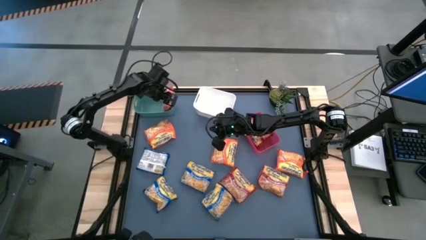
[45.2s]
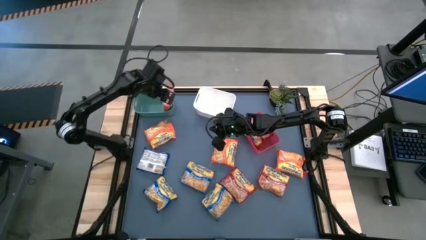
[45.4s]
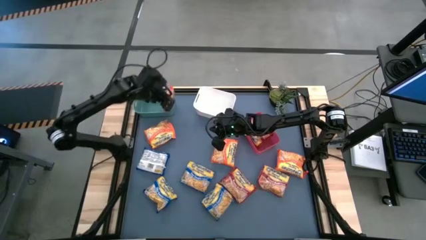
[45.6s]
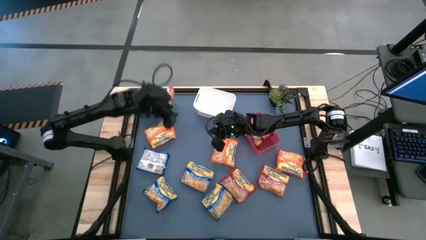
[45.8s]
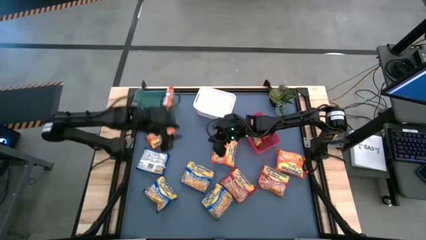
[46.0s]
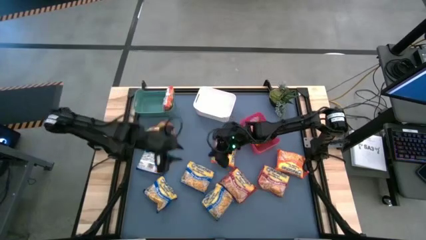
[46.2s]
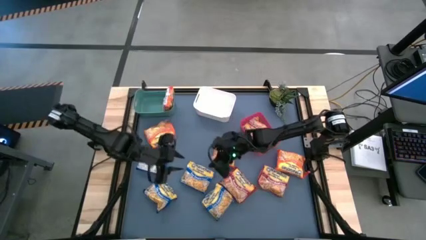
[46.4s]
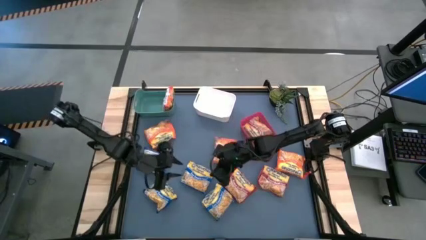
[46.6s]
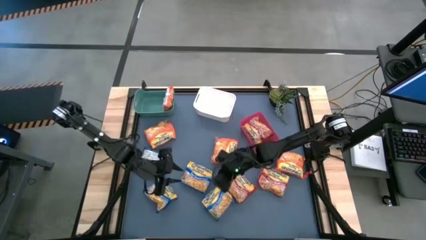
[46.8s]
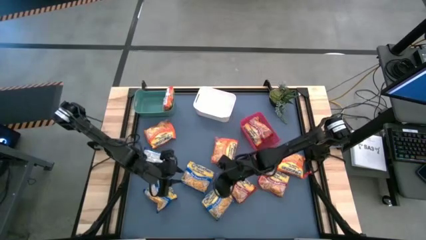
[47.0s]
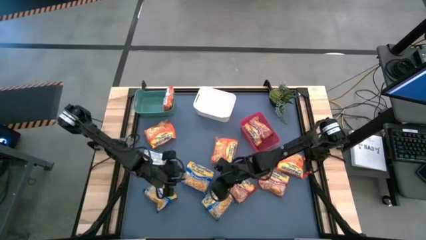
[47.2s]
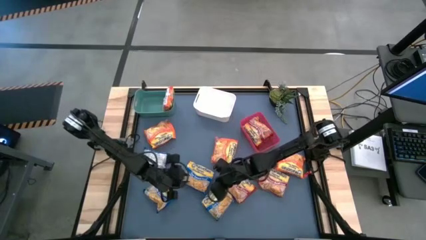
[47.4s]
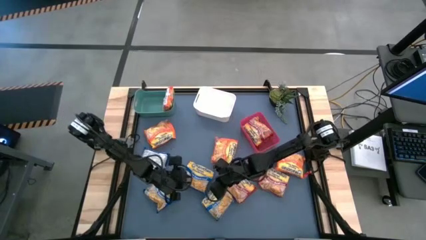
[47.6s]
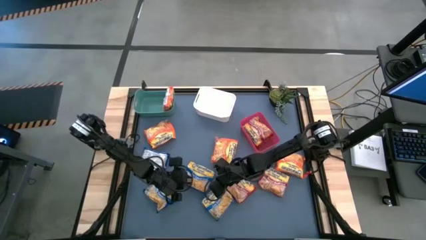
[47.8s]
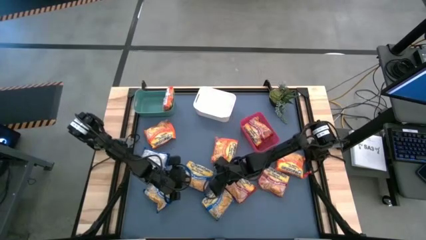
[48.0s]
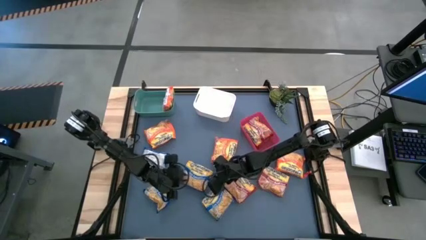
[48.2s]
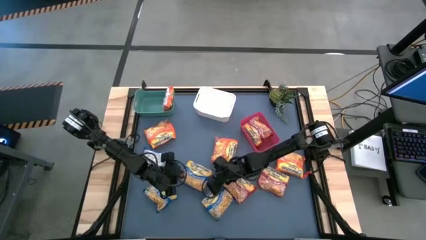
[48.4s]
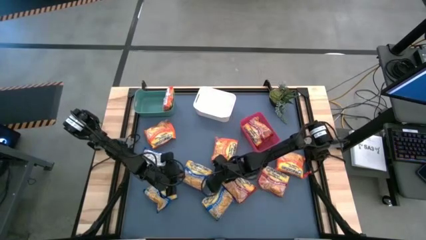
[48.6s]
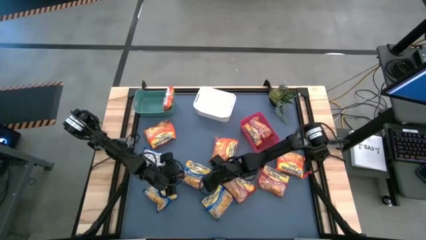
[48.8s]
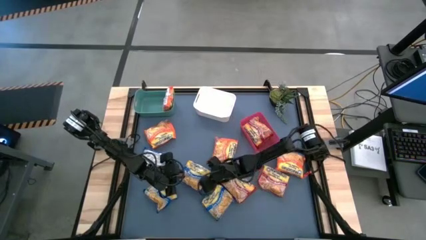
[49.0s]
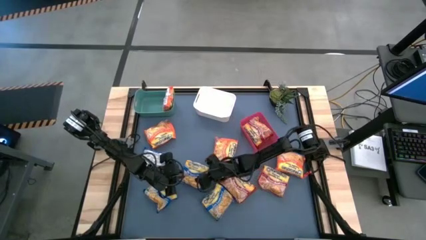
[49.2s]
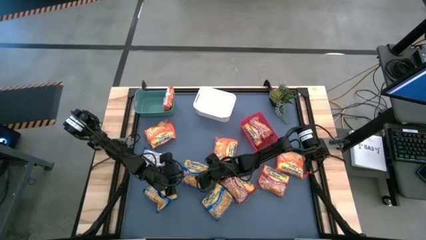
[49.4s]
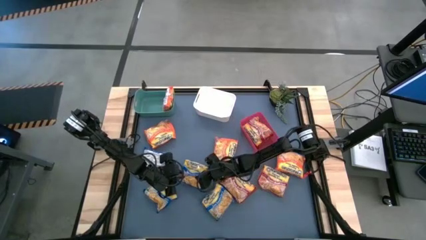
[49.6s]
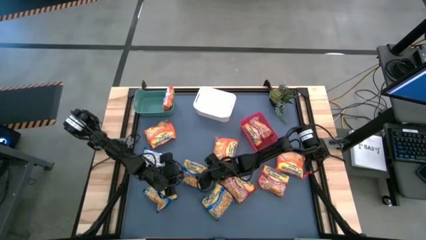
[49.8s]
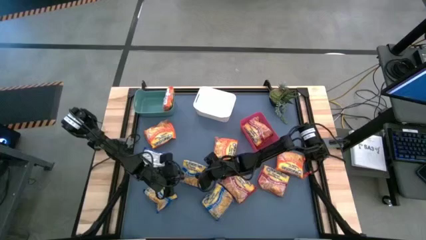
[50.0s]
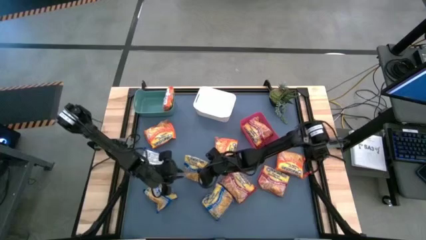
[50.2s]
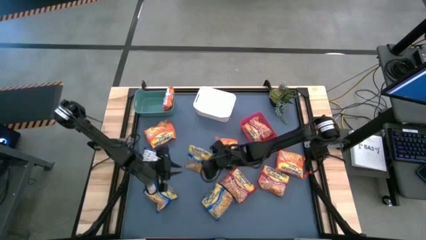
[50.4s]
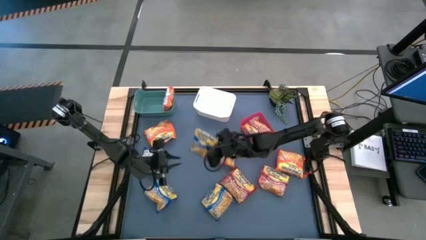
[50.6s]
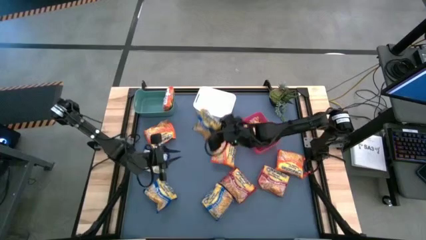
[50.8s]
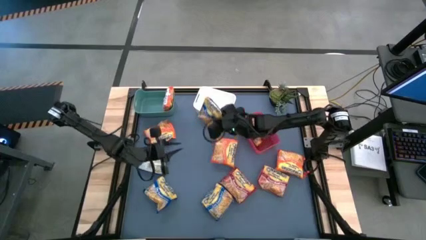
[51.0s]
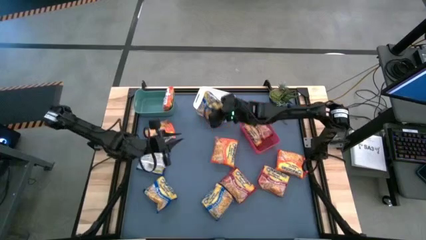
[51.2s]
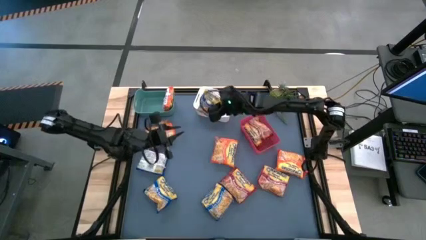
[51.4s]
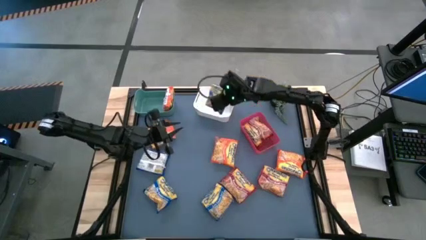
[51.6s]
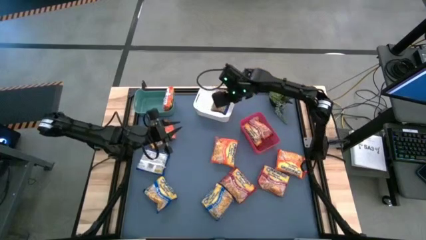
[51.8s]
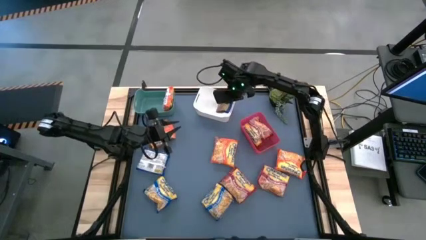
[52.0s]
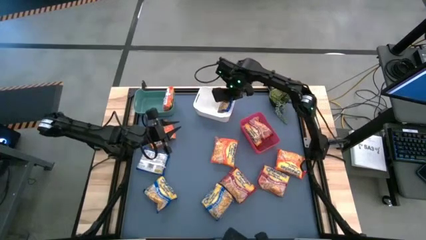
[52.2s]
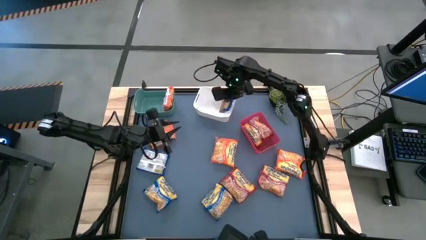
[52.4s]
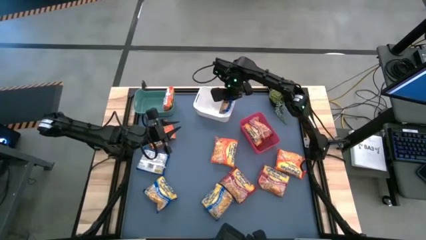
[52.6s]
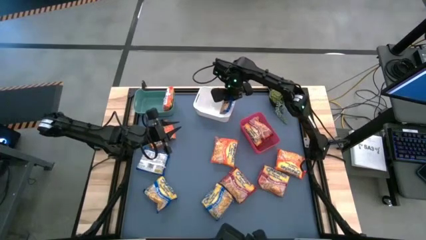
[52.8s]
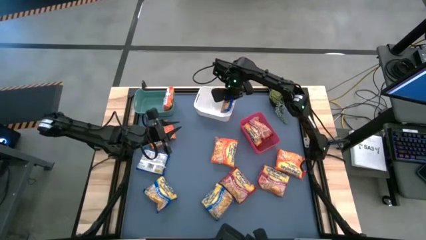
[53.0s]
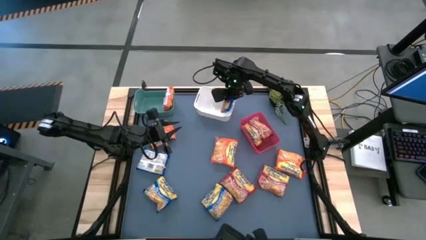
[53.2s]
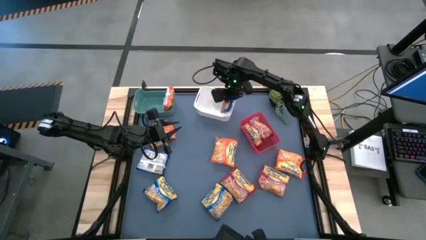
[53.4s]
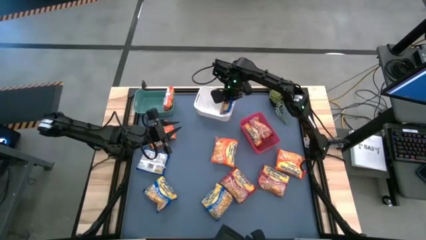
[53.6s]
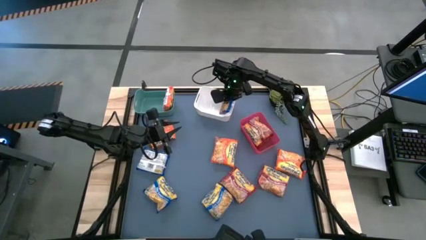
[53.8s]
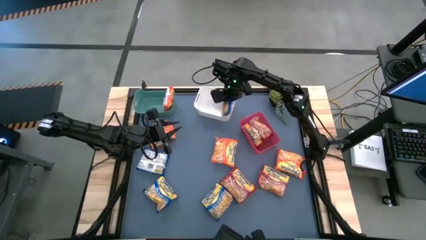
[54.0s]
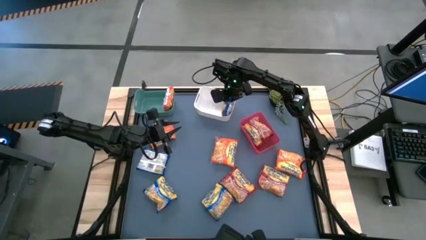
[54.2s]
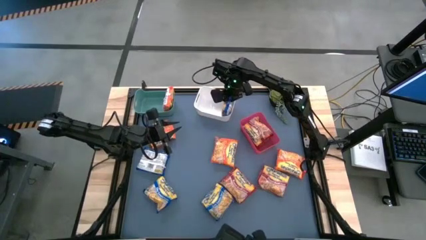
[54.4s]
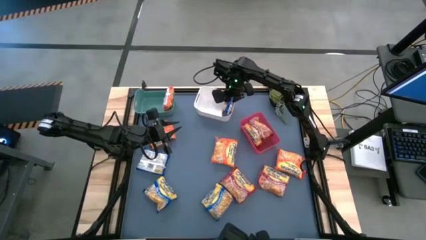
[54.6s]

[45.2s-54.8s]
Task: Sort Maruchan noodles
Put the blue noodle pack into the white bin

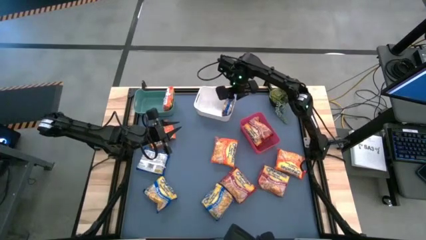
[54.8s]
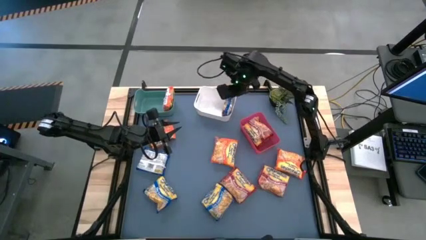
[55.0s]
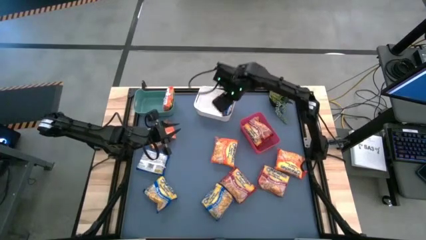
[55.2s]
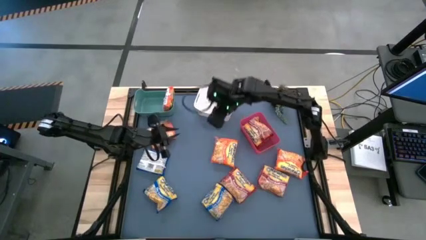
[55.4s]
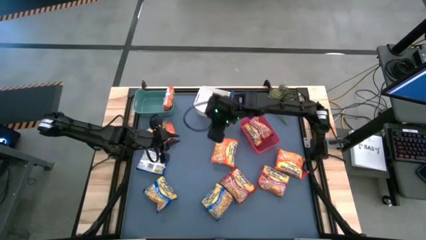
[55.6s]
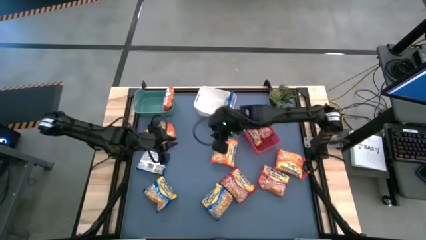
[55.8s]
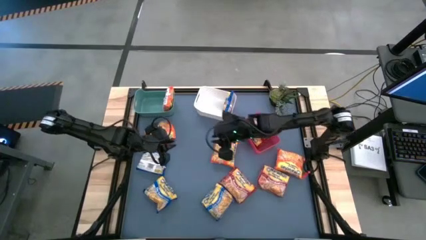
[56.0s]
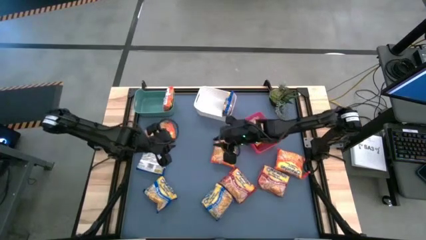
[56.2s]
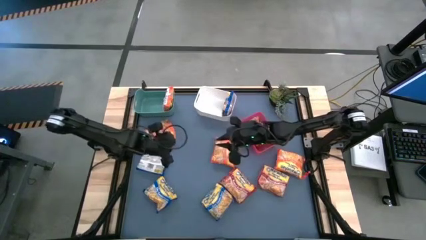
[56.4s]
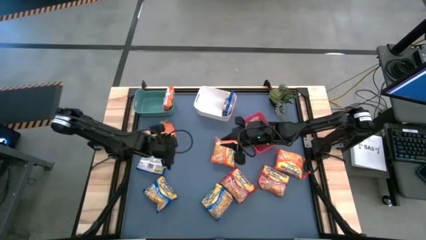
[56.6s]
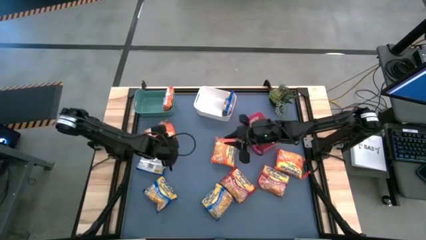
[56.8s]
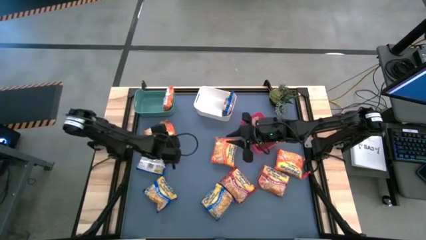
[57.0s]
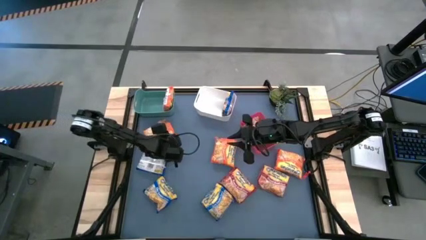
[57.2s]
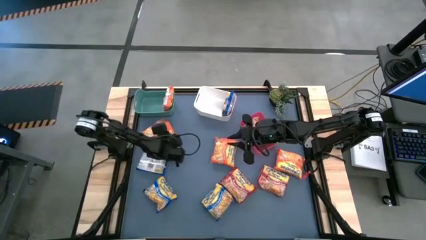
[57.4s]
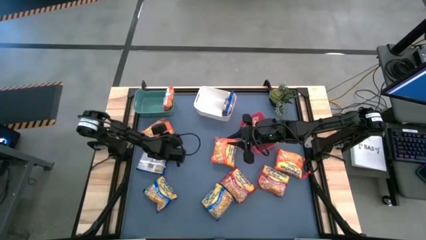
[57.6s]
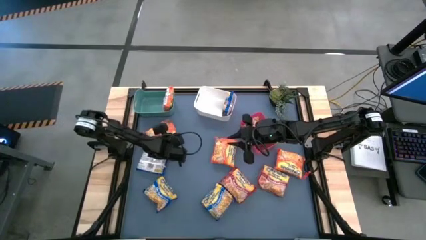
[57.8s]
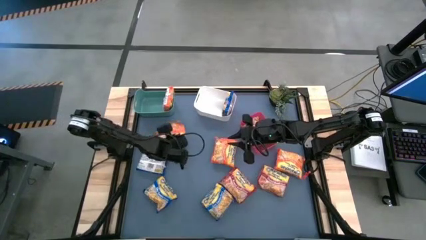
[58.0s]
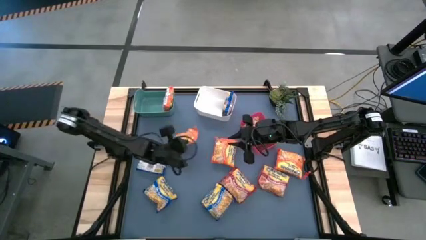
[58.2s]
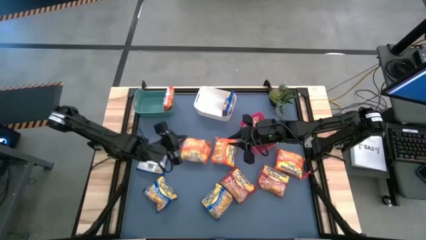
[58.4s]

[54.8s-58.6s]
Put the orange noodle pack into the green bin

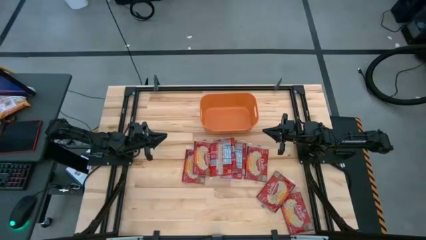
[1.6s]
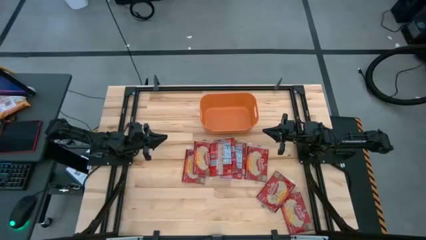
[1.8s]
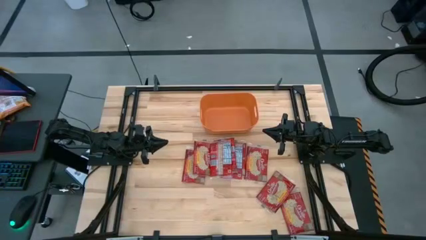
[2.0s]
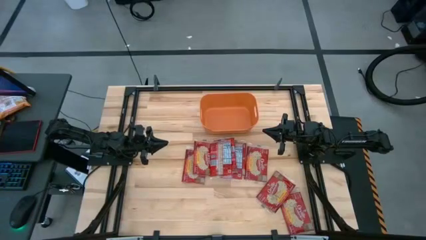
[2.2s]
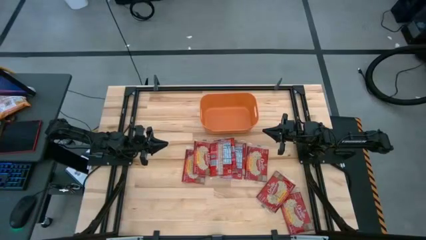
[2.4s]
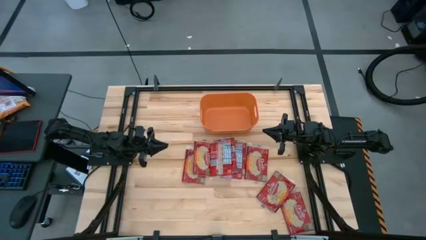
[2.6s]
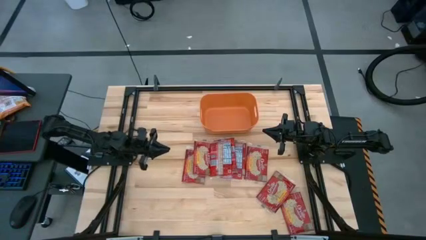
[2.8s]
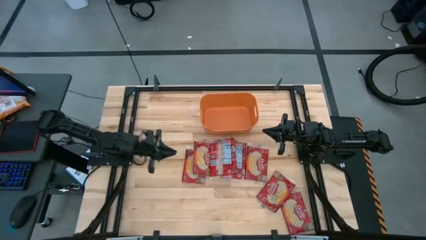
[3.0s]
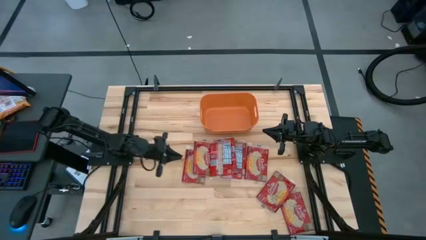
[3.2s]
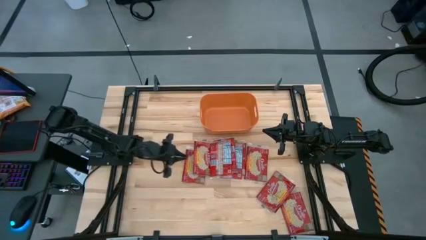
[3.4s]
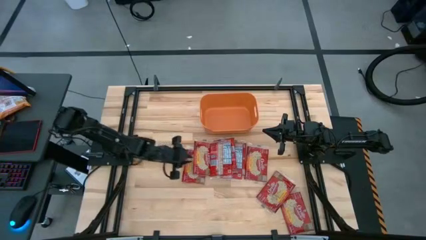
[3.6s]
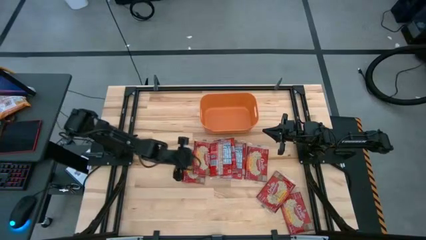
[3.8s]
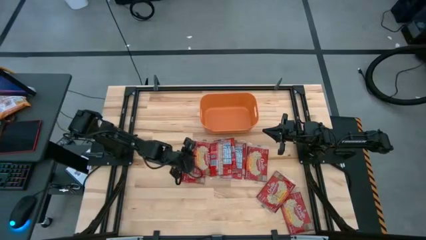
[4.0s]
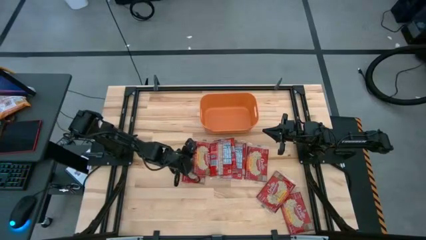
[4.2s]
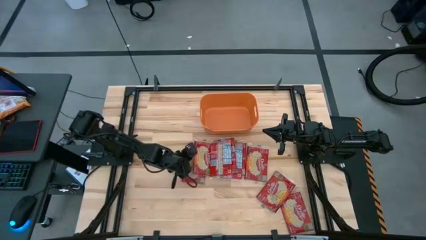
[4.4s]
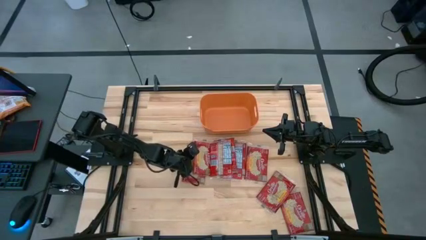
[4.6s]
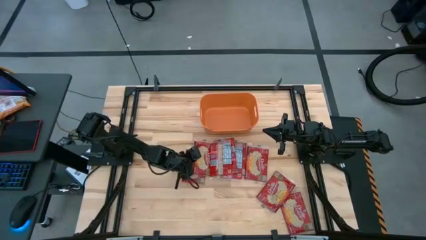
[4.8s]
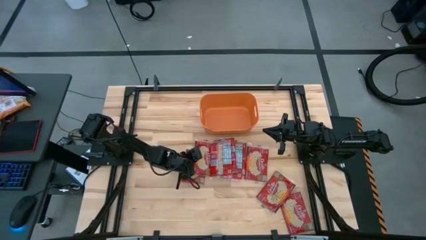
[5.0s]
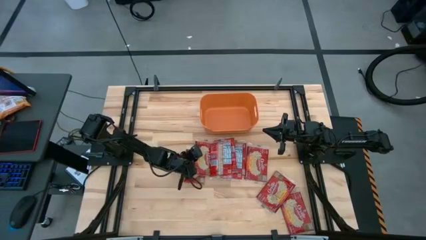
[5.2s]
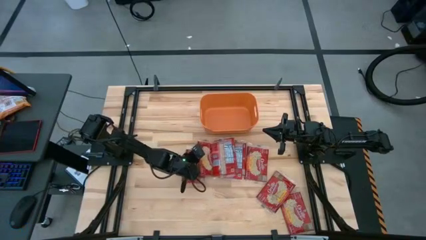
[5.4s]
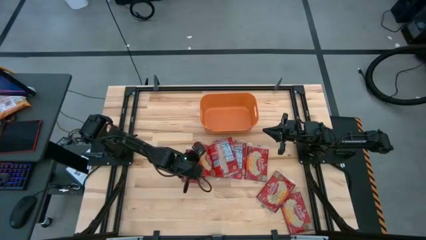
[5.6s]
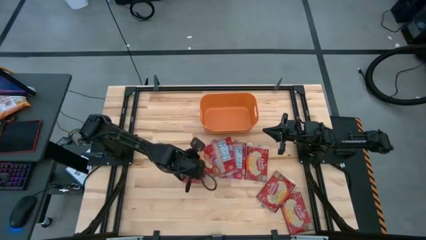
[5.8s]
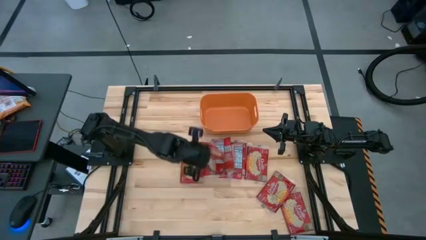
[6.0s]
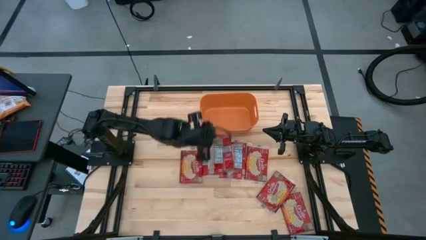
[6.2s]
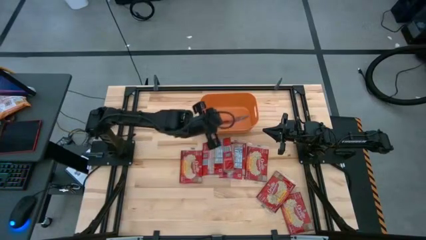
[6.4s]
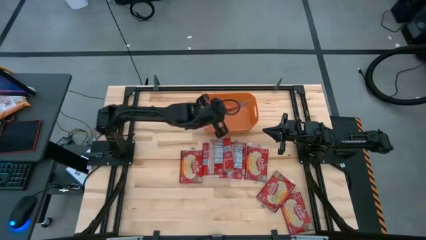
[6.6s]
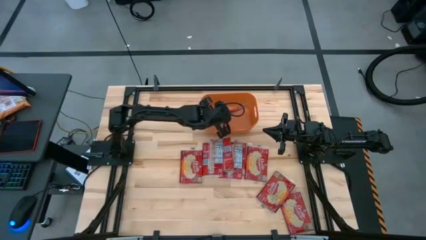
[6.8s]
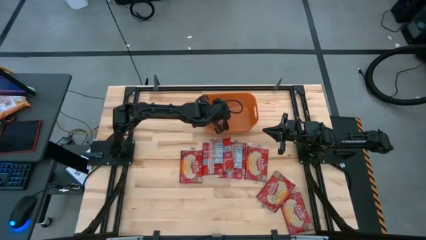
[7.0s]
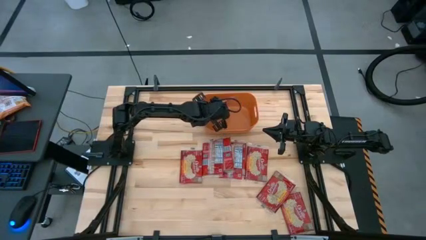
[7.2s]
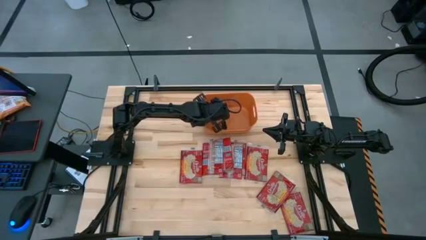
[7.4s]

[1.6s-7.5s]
Task: Sort popcorn bags into baskets
Put the red popcorn bag into the orange bin
